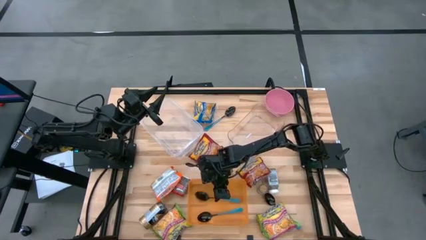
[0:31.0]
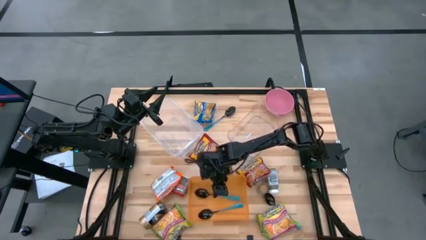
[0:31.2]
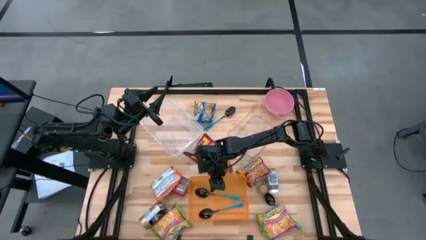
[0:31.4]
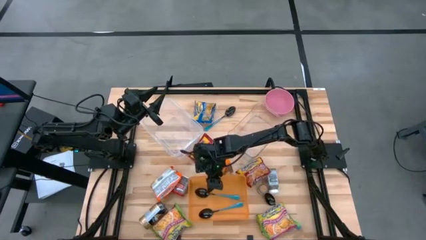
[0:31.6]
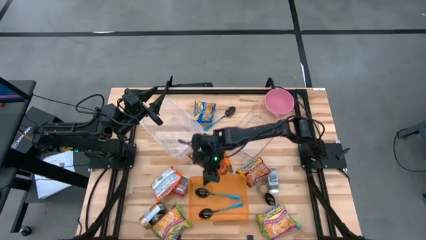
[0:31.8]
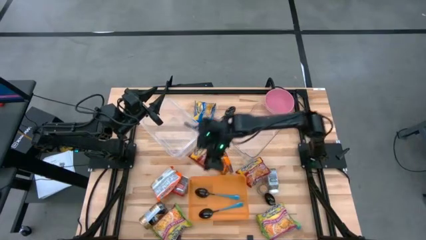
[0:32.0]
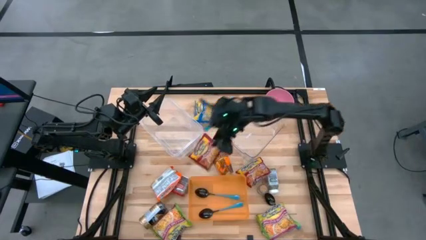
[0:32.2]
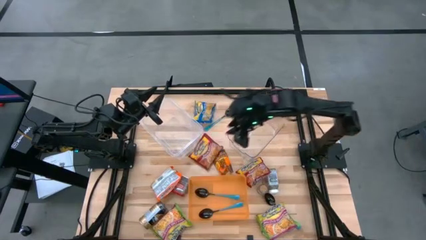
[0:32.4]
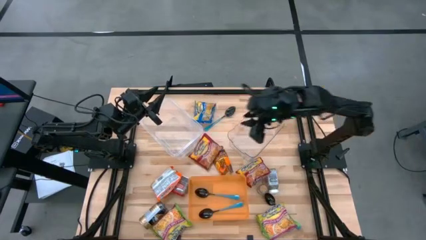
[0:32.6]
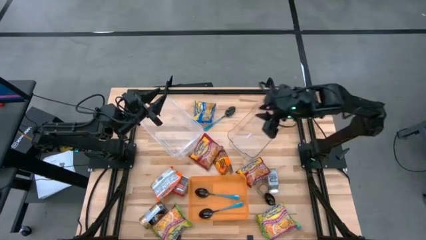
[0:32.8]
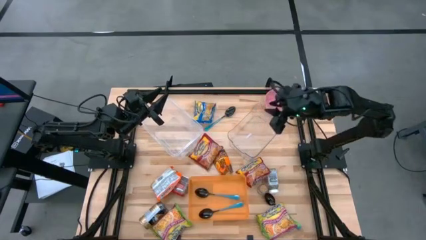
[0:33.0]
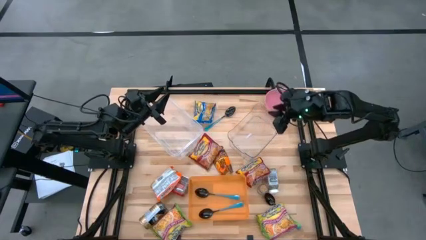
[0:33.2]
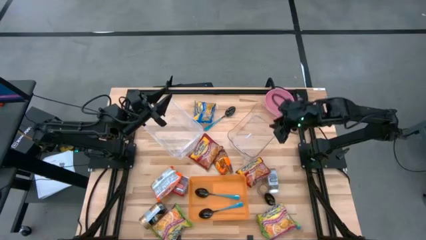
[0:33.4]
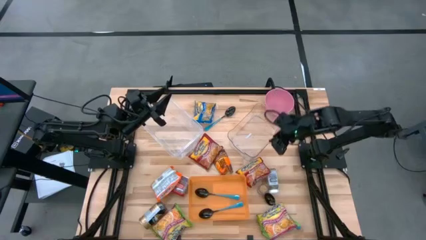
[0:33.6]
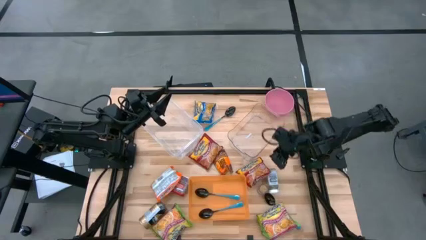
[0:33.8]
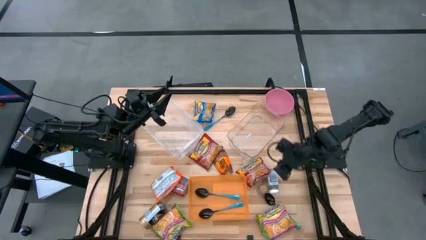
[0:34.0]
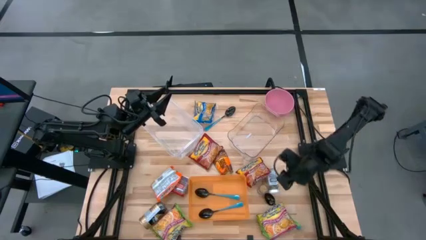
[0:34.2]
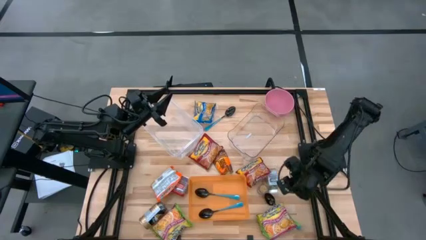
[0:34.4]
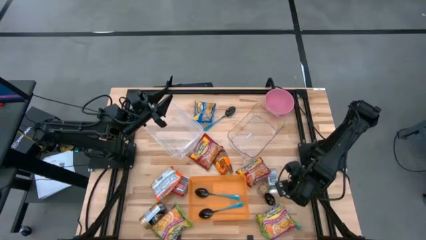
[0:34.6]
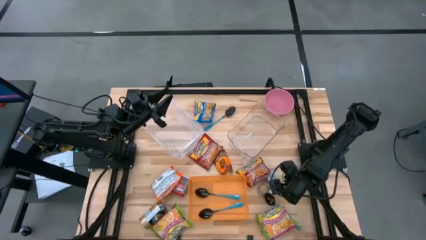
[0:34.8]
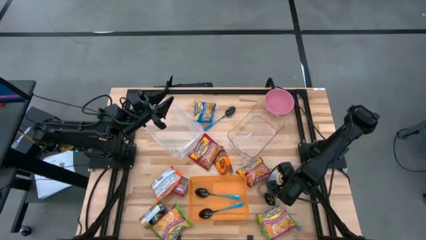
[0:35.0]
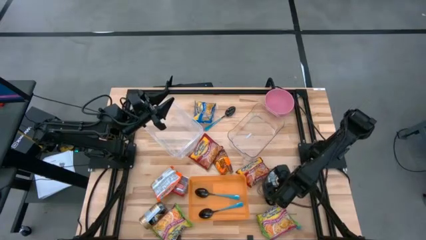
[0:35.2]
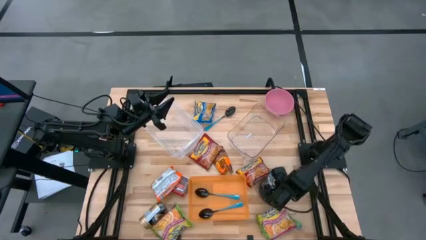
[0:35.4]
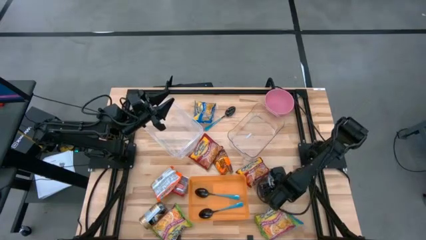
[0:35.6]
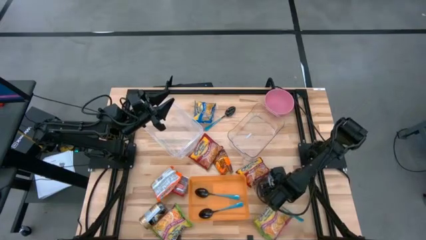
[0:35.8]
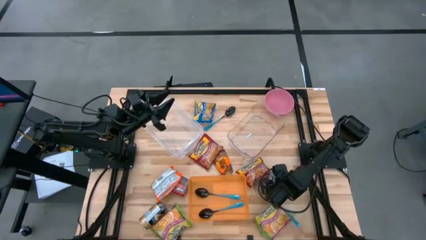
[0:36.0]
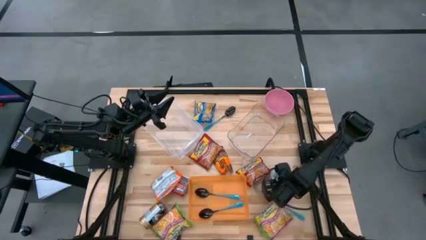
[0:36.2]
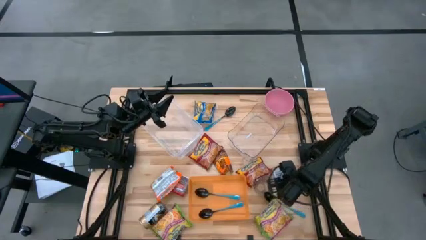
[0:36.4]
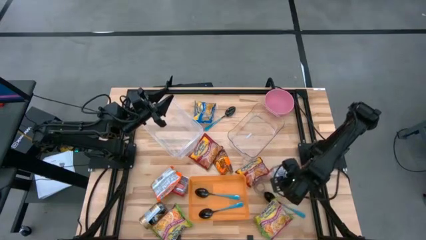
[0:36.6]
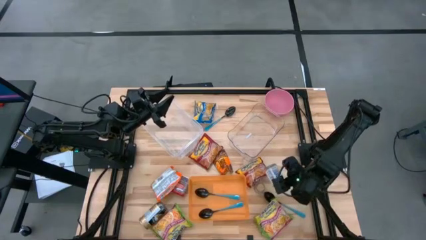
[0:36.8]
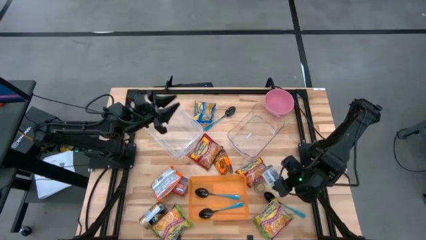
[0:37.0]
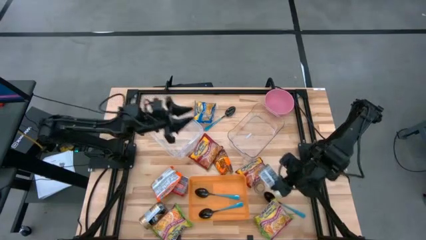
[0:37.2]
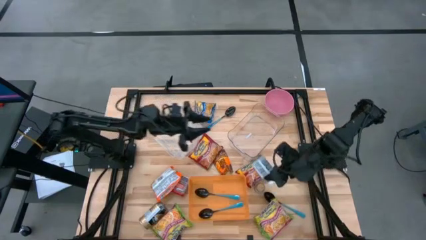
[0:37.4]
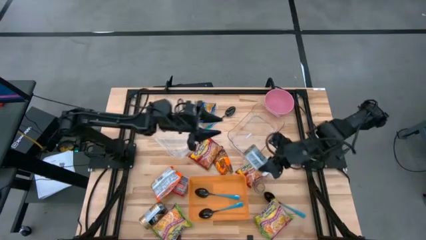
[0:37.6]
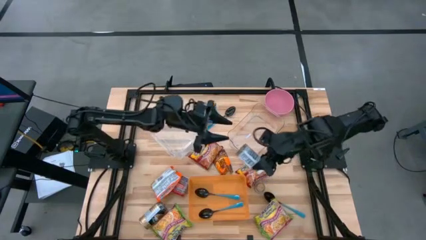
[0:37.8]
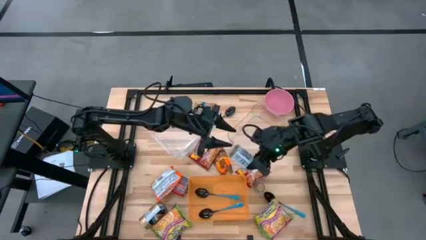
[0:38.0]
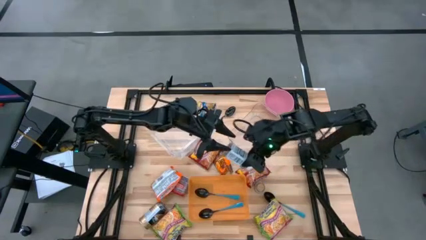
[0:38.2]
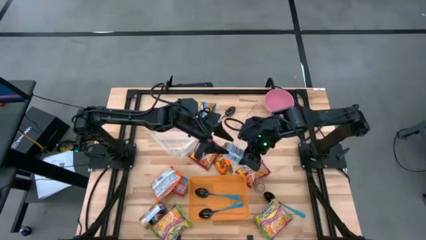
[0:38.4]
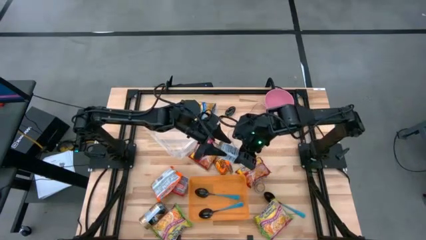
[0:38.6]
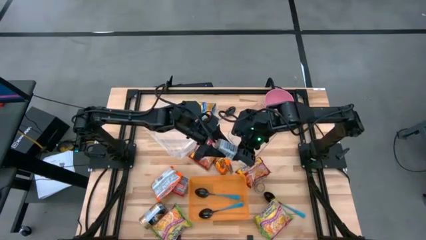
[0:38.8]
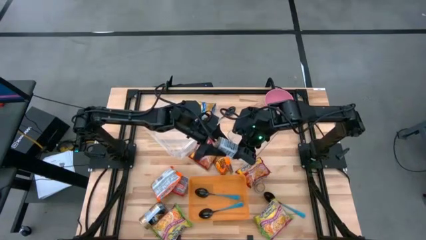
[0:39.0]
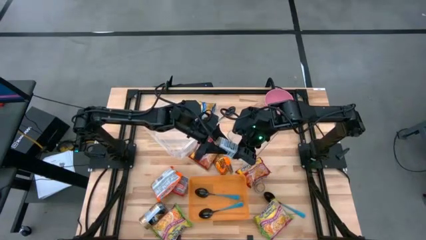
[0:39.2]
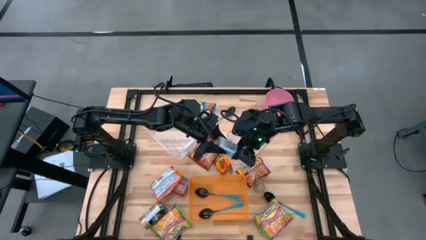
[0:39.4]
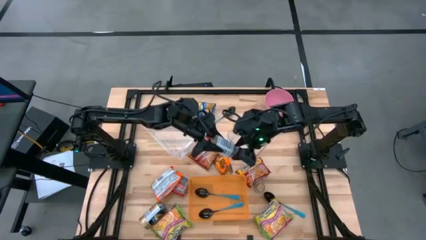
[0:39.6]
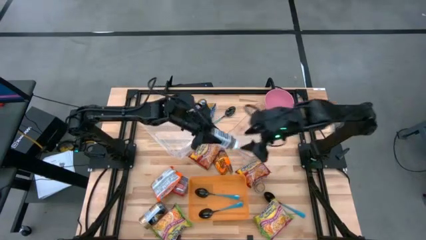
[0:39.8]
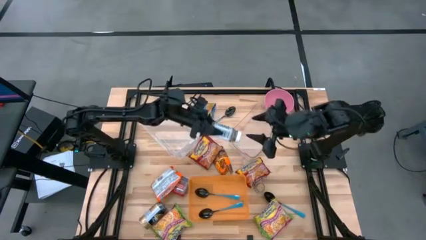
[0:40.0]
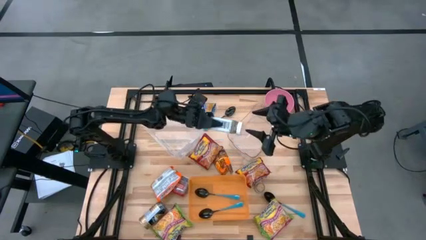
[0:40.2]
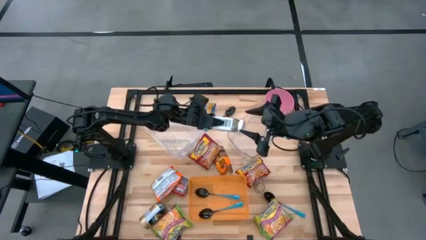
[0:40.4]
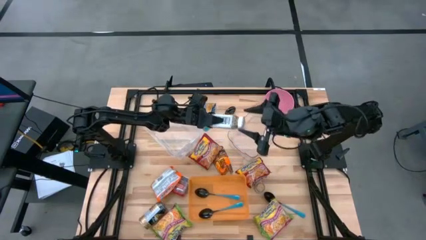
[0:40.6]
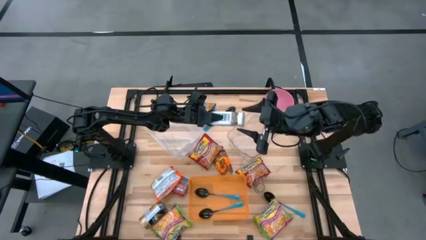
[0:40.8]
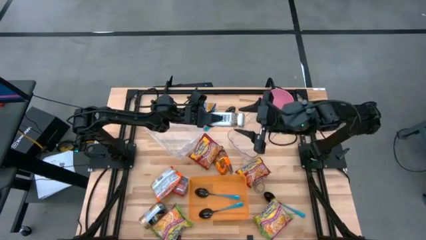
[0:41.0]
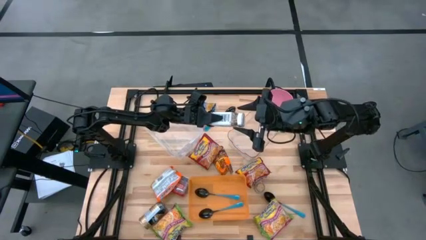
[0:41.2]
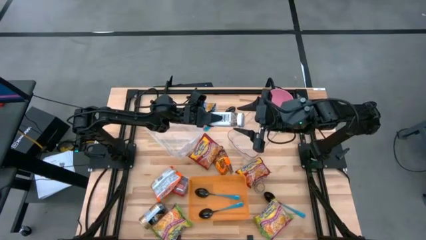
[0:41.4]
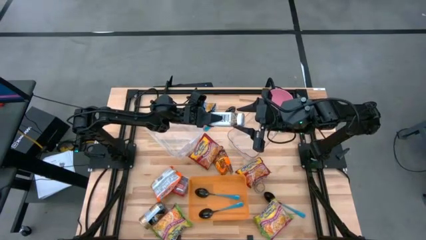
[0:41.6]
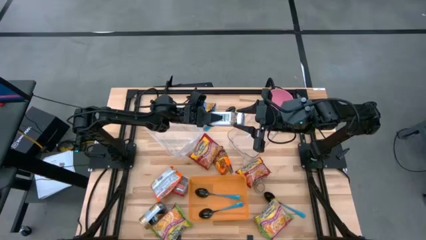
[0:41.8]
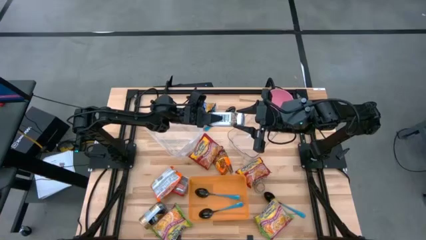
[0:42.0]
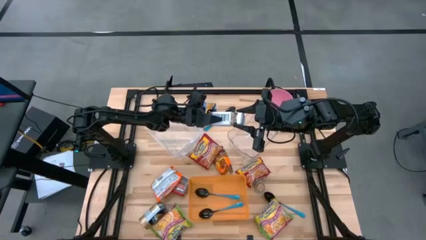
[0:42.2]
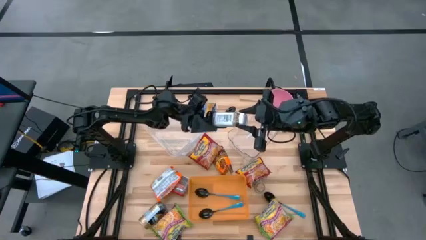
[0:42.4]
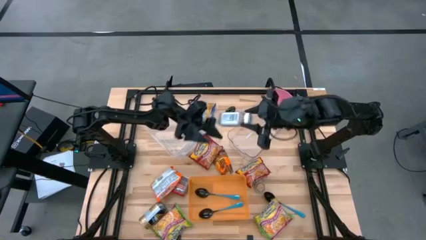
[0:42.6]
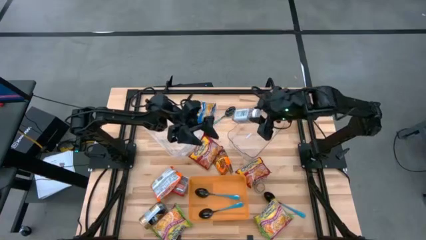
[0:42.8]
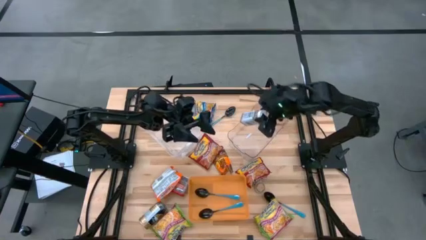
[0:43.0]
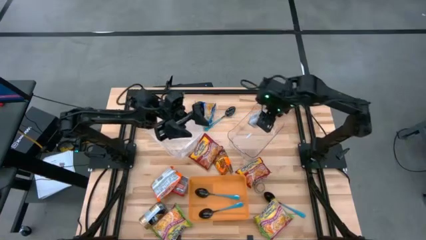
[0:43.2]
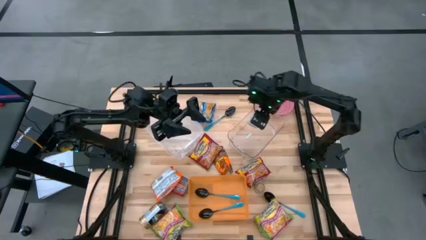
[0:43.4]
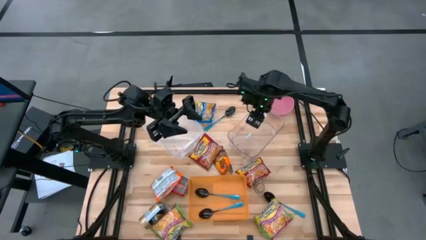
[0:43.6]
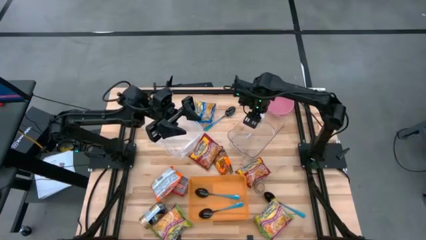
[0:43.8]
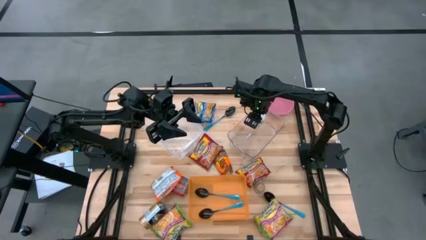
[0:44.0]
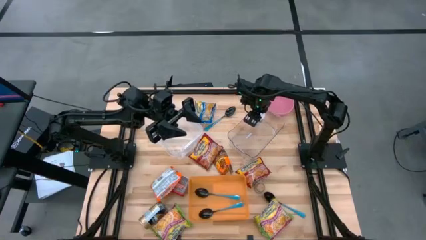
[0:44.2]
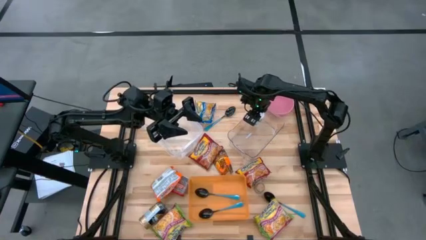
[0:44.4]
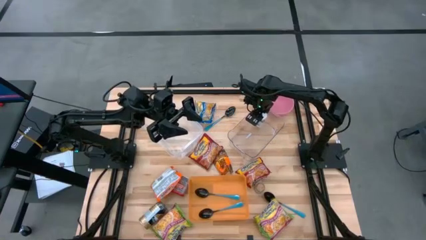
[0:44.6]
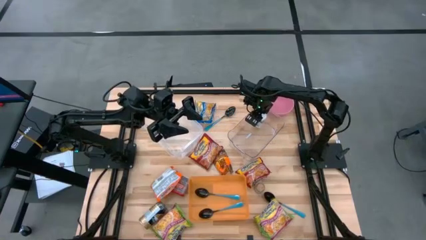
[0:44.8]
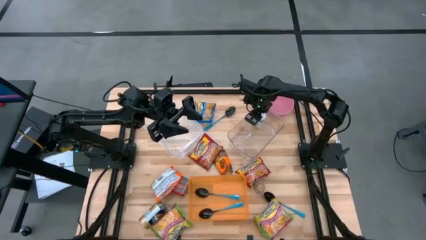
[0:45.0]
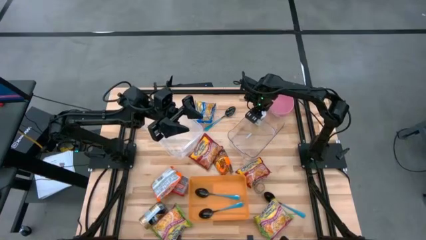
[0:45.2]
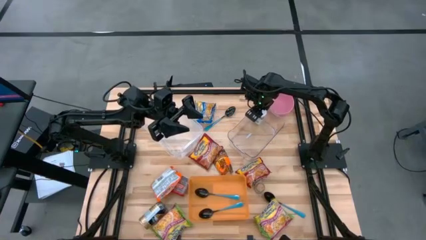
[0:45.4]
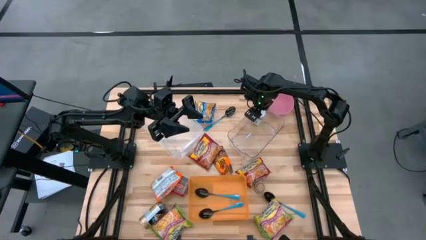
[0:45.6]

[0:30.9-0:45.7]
Task: Pick & Place Food Item
Put the white seasoning bottle into the transparent bin
